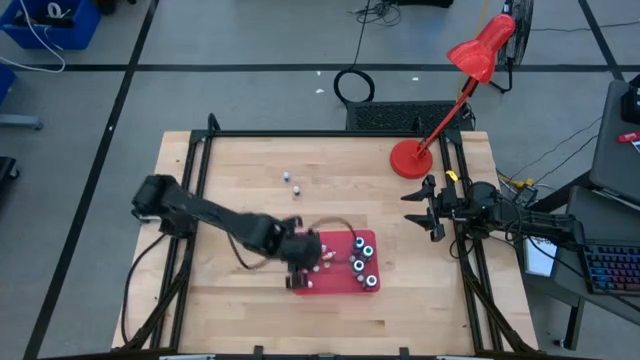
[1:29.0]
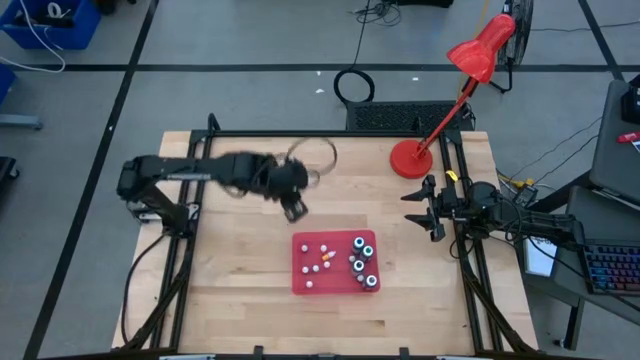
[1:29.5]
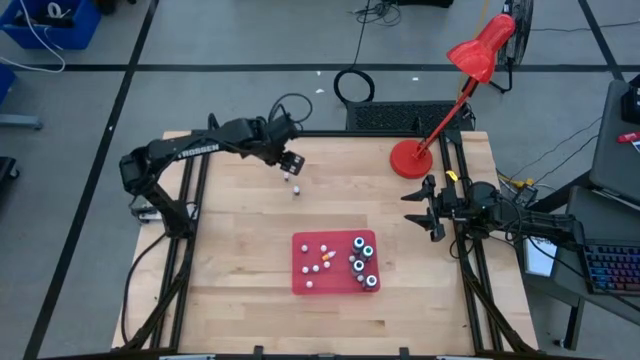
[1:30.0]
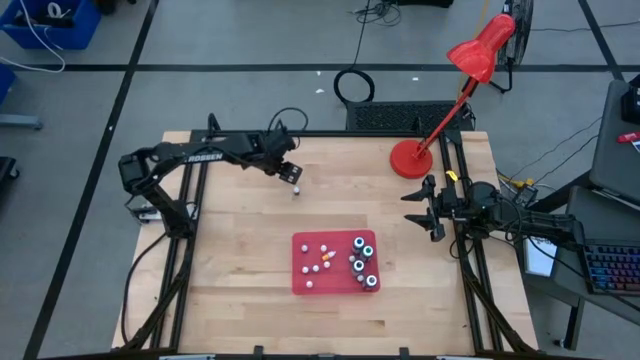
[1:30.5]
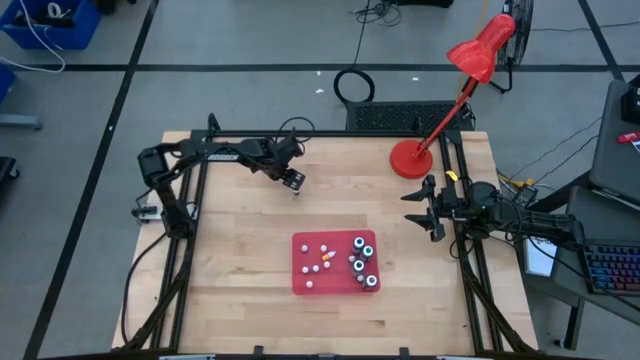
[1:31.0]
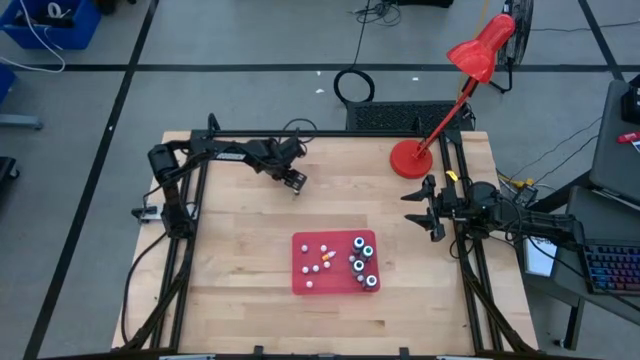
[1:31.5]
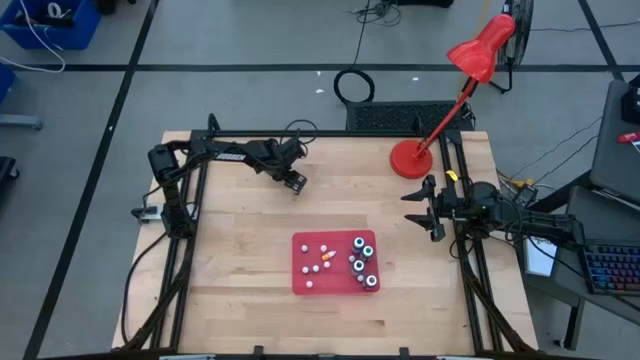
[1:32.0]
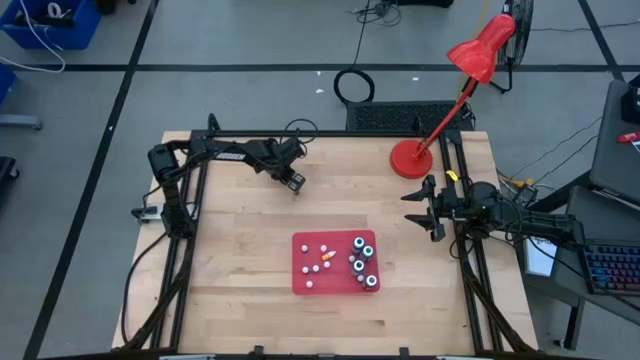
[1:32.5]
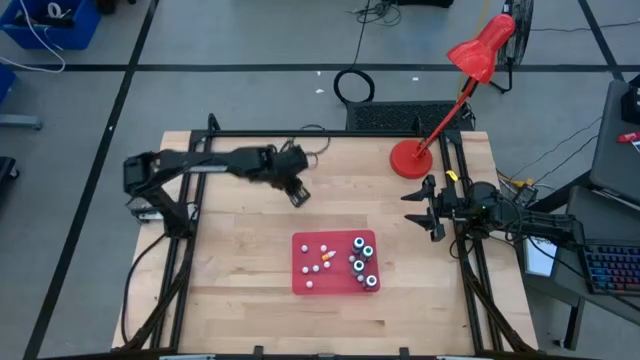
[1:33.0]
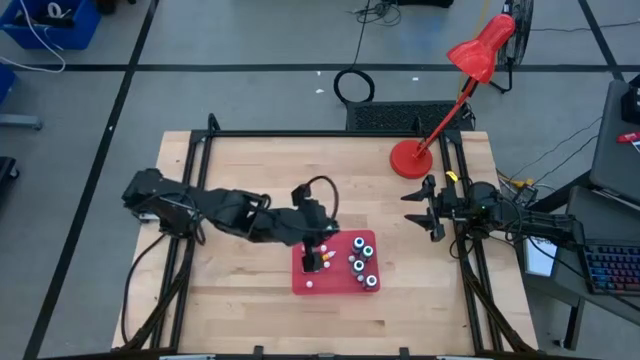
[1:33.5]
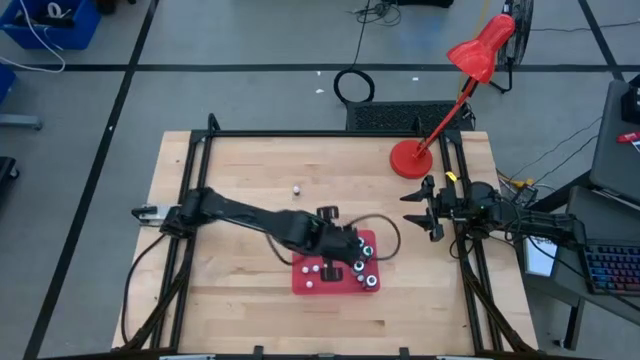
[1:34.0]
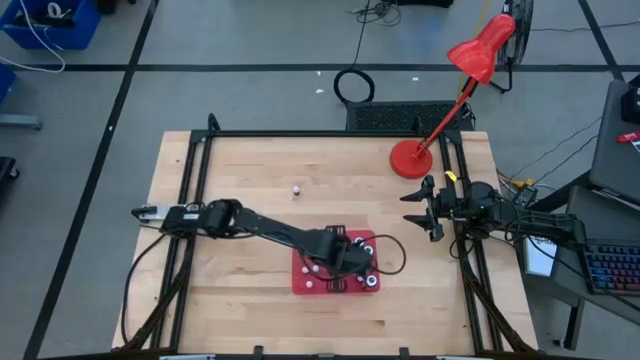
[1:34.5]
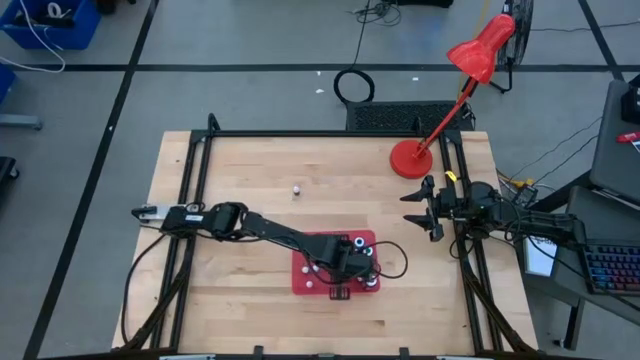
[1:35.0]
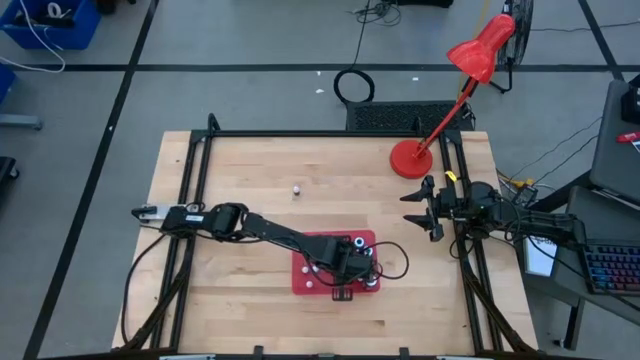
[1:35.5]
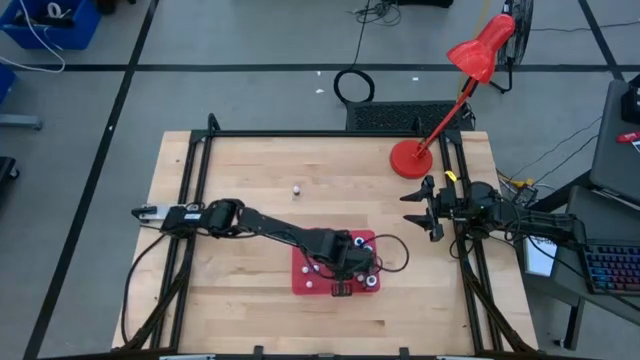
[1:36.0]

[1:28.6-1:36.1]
Task: Pick & Place food coloring
Put the small black food coloring bottle into the bin

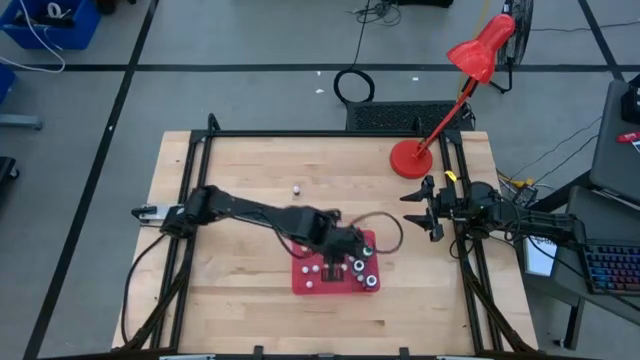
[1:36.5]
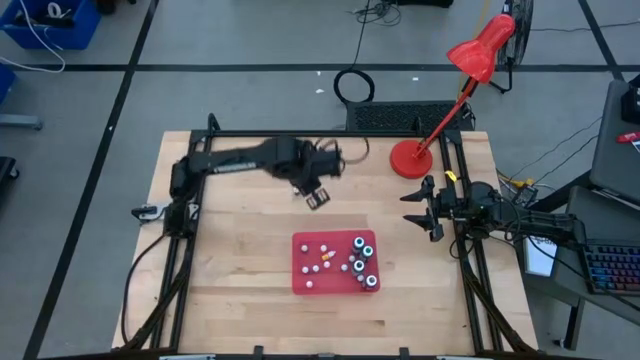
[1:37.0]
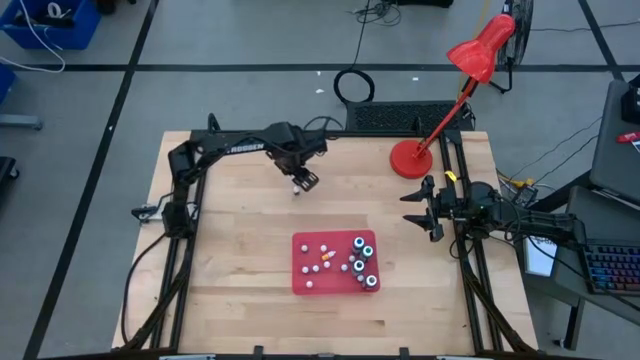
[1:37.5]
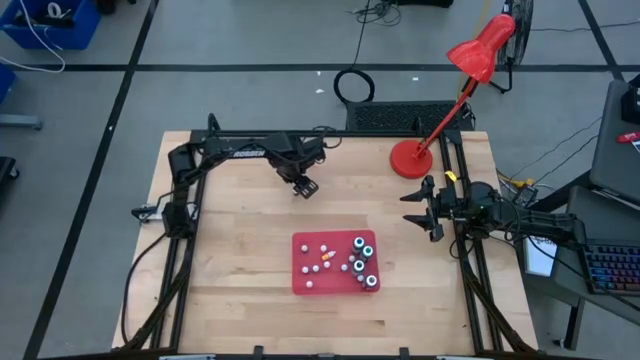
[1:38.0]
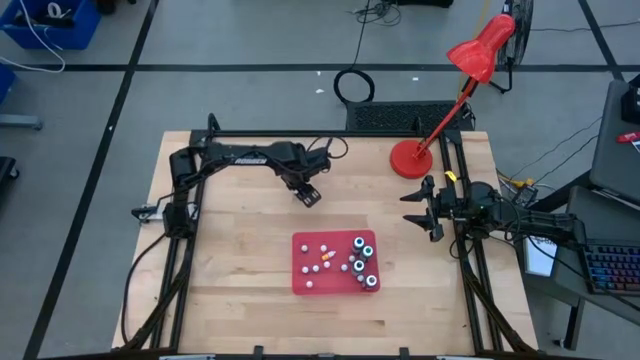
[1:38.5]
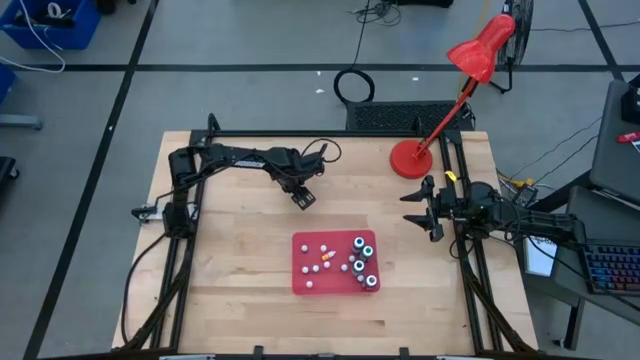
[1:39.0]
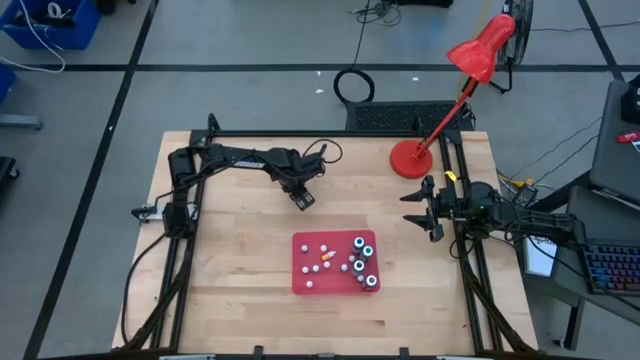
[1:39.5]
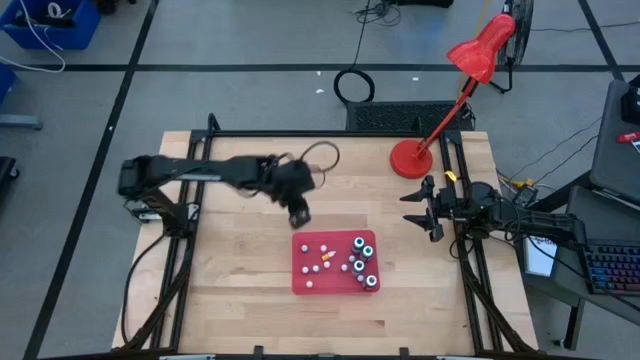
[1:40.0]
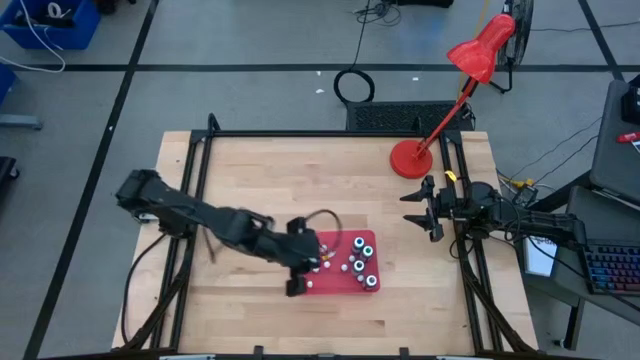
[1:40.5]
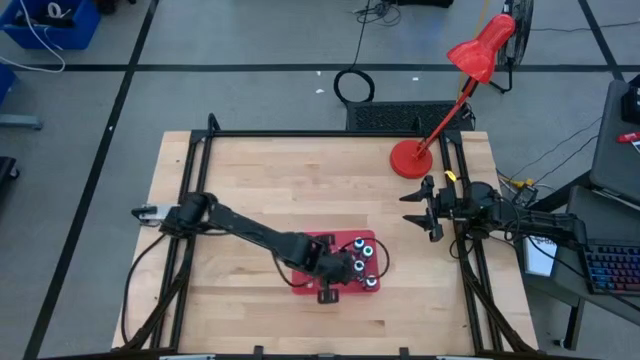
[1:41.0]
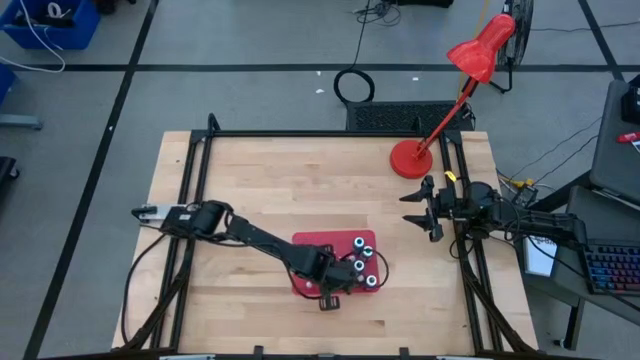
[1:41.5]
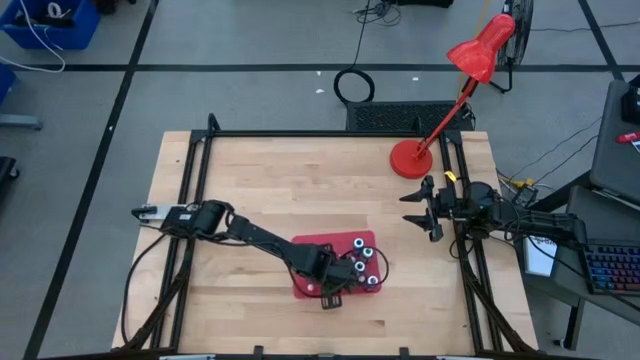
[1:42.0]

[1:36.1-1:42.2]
Put the small violet food coloring bottle into the bin

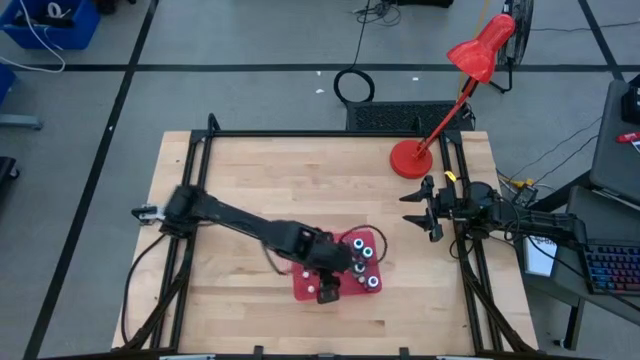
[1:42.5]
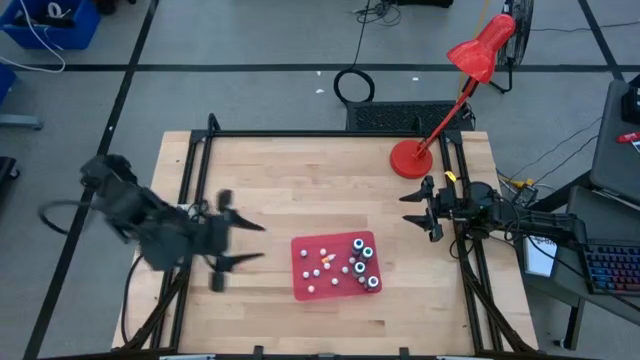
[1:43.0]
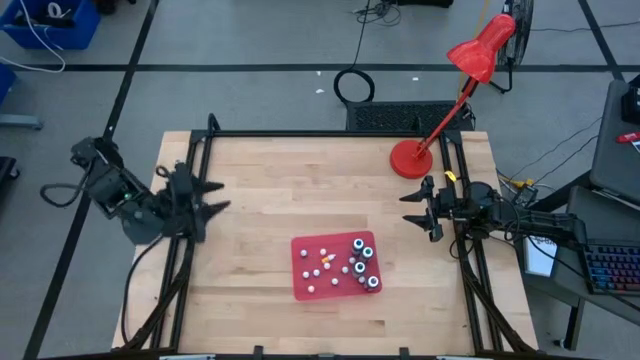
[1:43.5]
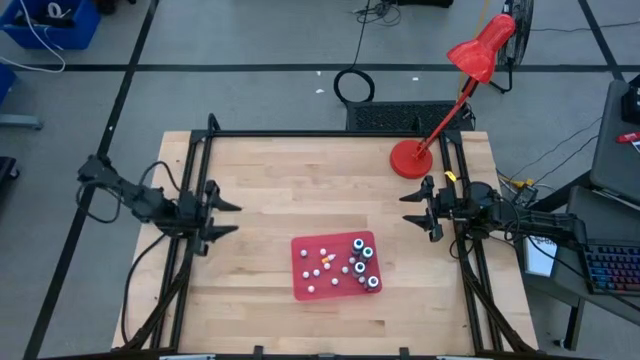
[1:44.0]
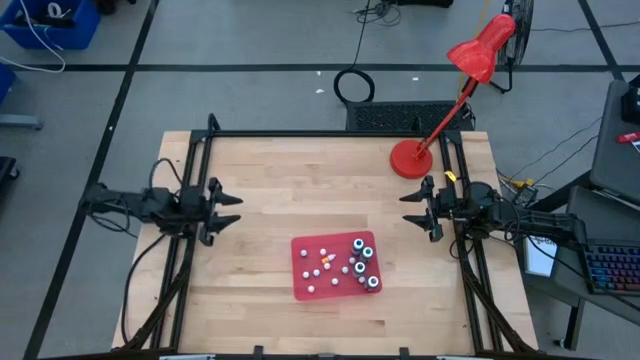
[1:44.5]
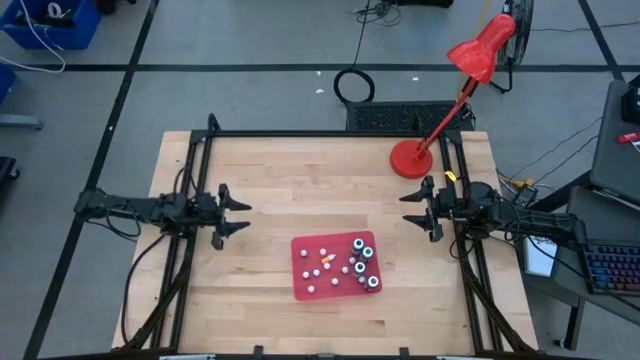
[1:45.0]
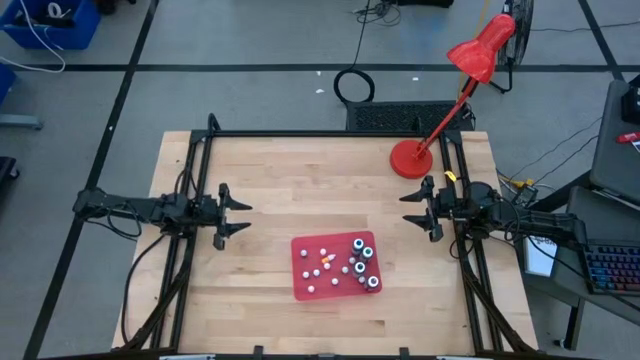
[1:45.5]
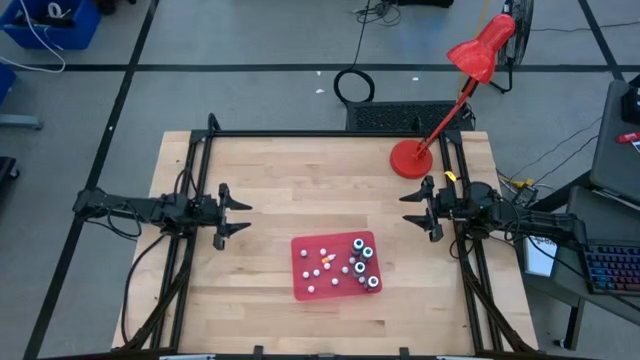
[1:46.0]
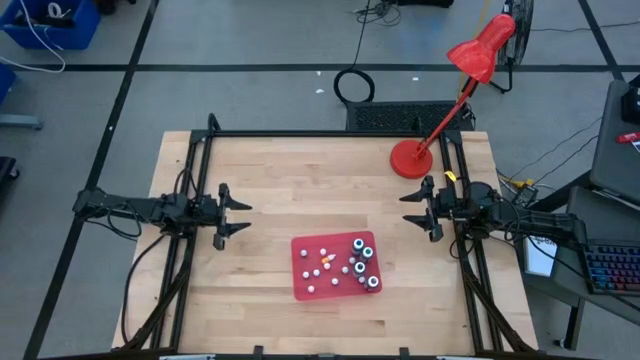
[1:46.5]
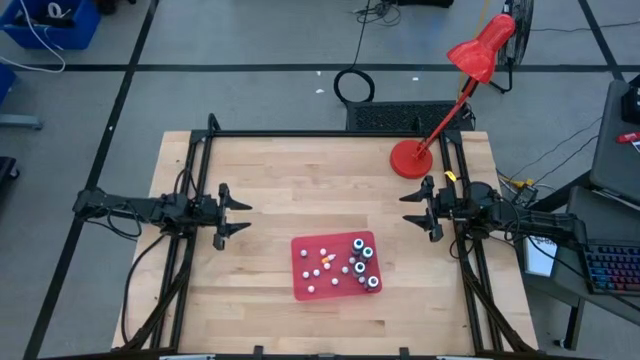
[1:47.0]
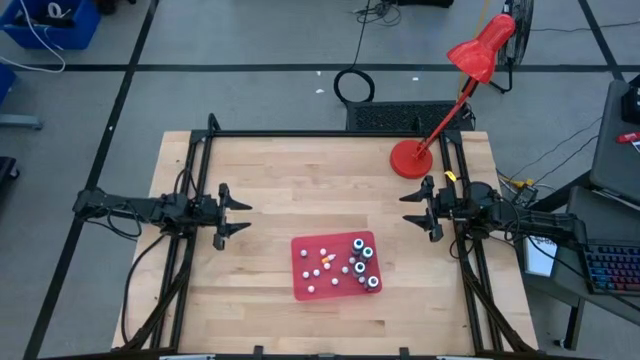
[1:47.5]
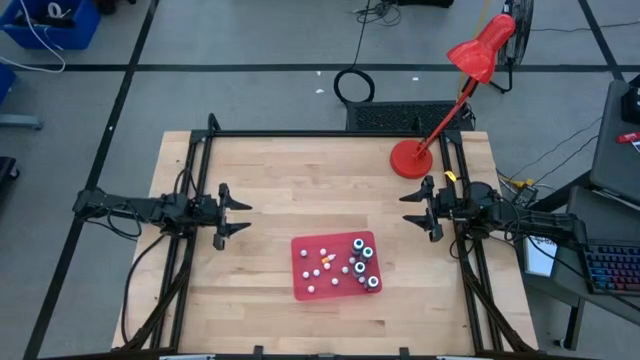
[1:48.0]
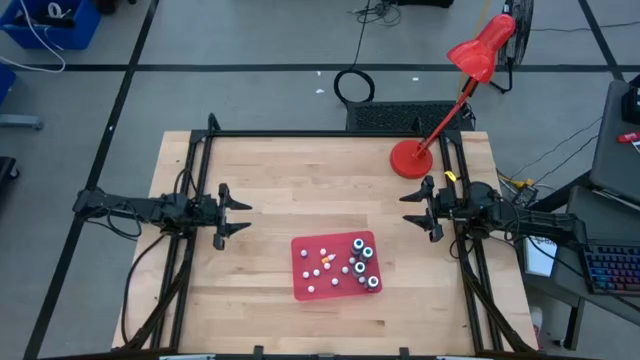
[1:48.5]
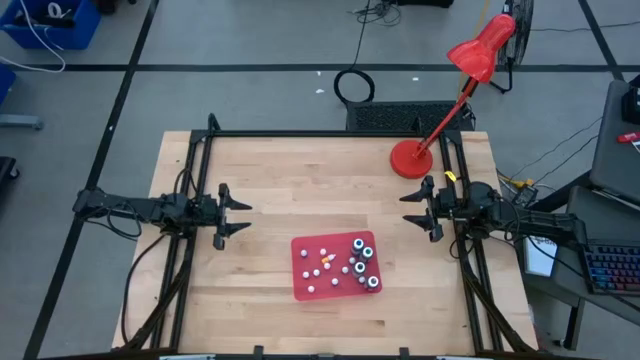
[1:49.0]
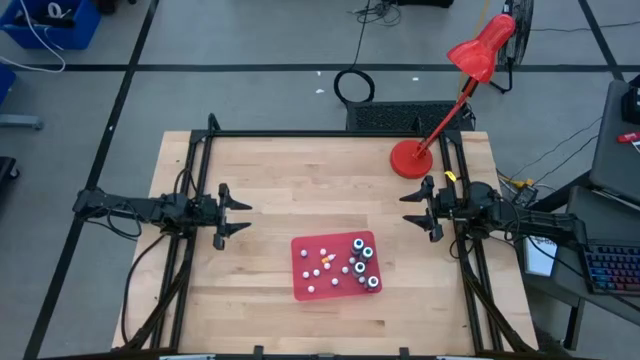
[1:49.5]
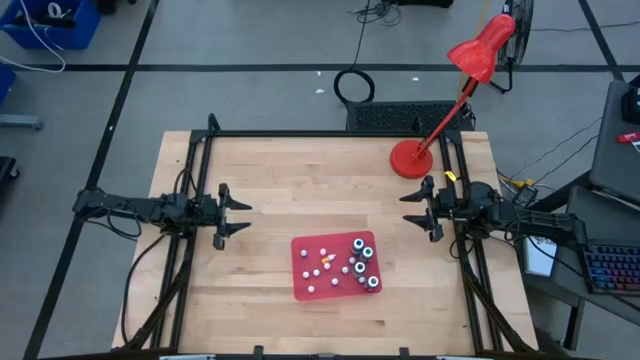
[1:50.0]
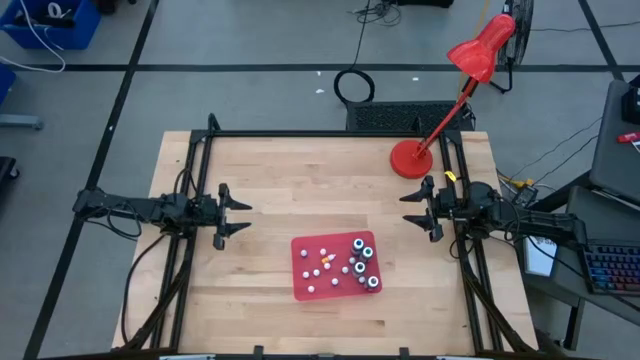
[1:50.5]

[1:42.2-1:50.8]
Return to Home Position

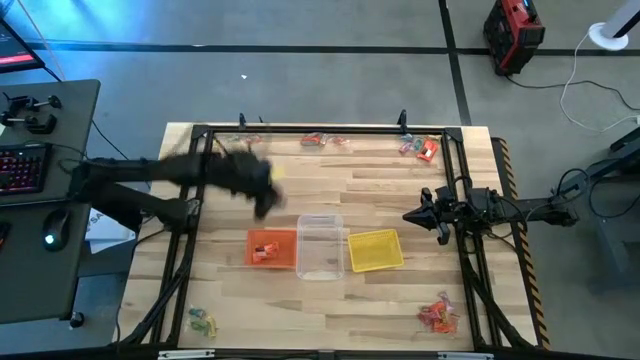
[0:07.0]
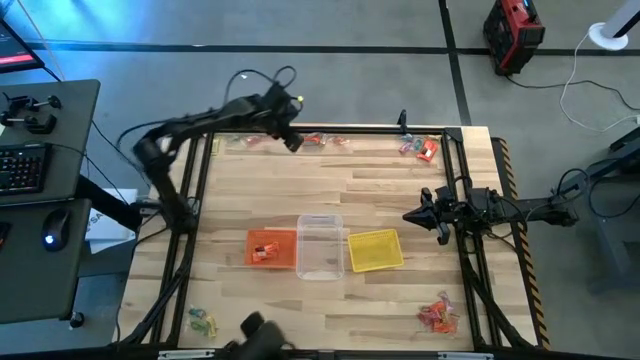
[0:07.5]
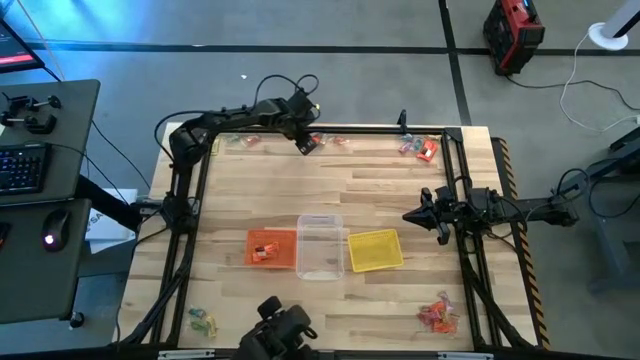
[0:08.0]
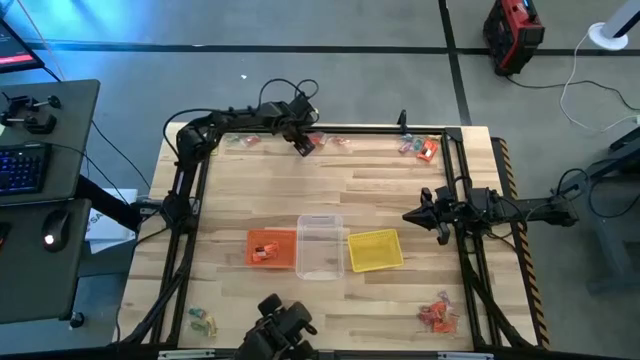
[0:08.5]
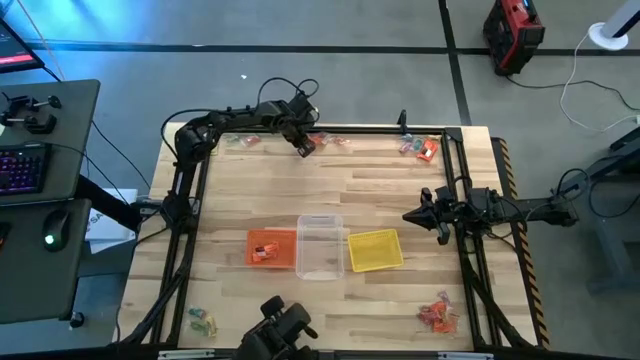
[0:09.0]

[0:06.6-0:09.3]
Task: Sort candy by brand, put in halloween buckets
Put the orange chocolate bar into the orange bin
